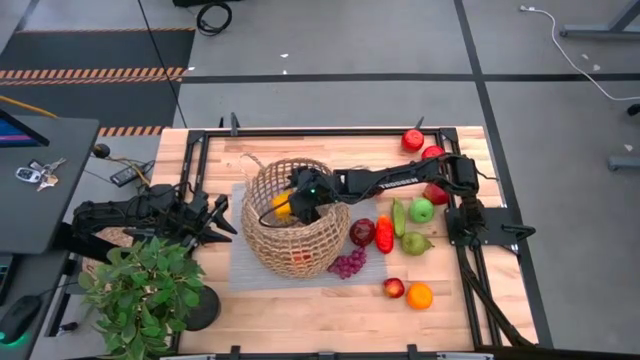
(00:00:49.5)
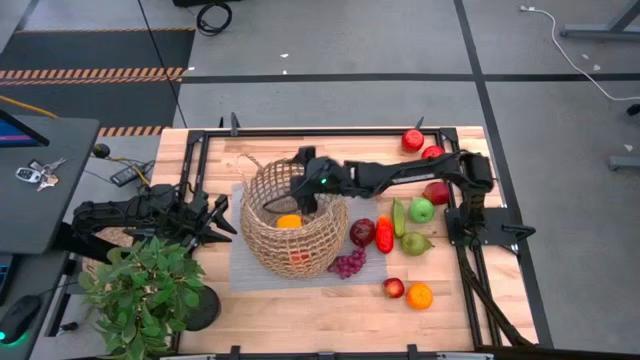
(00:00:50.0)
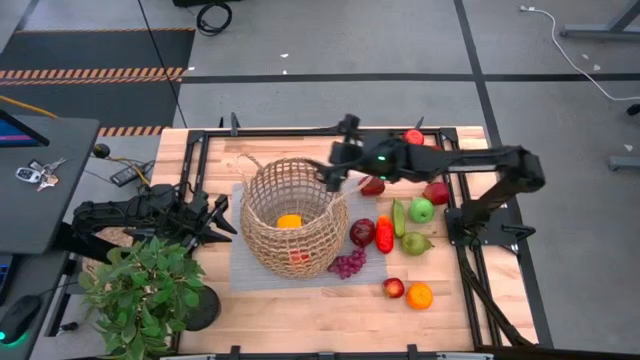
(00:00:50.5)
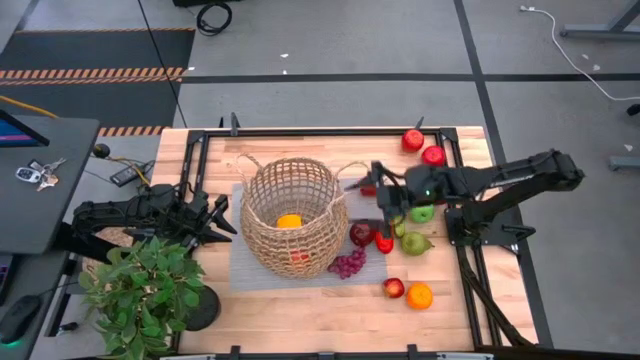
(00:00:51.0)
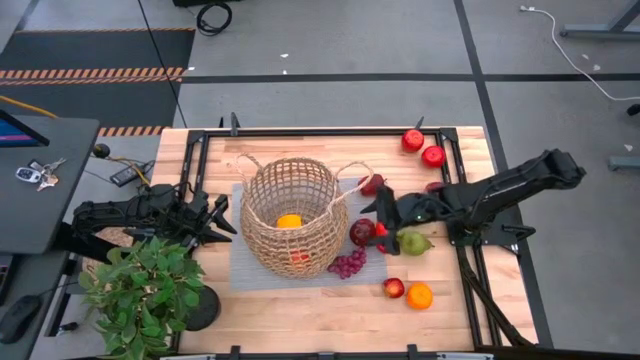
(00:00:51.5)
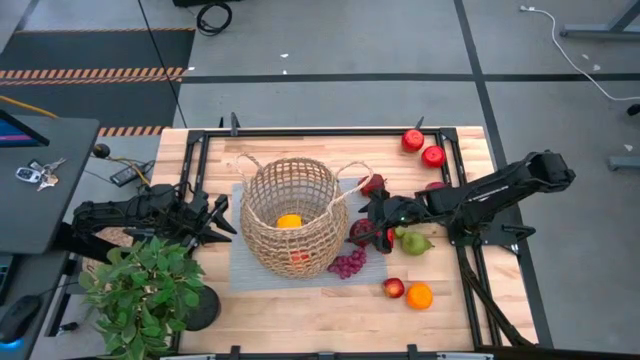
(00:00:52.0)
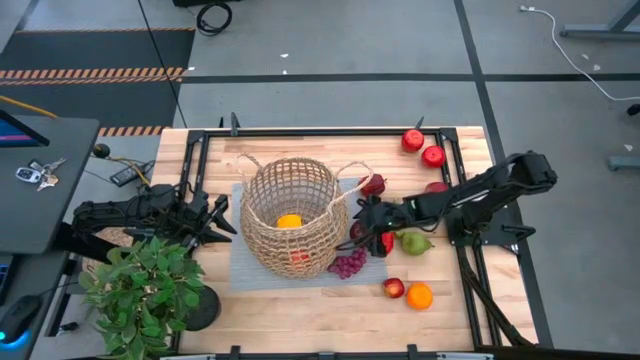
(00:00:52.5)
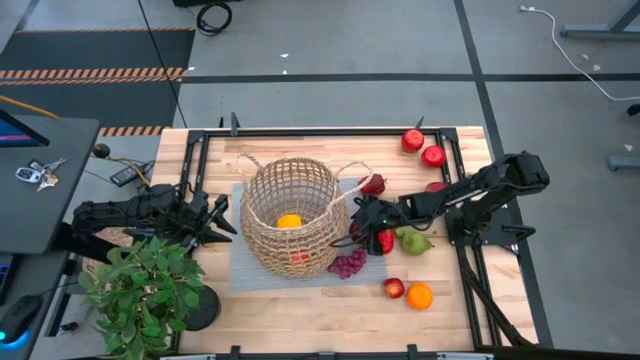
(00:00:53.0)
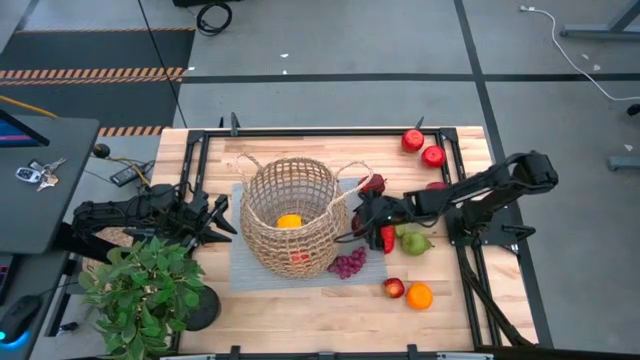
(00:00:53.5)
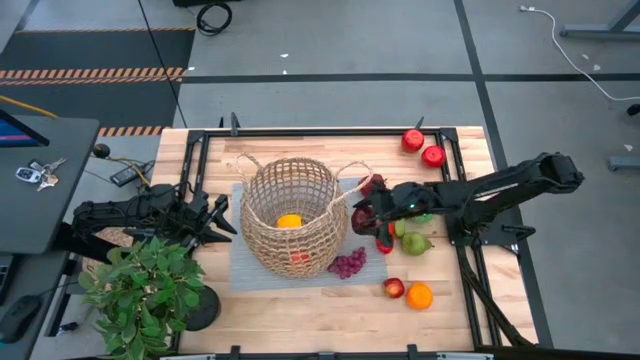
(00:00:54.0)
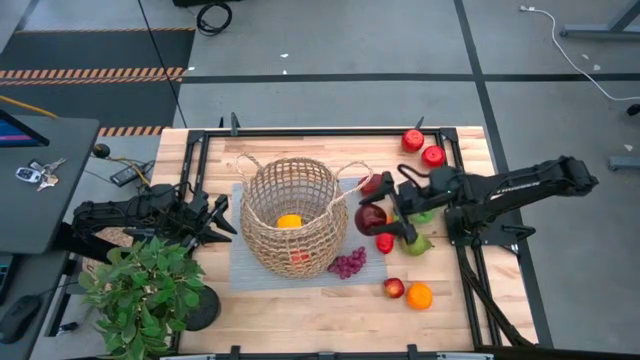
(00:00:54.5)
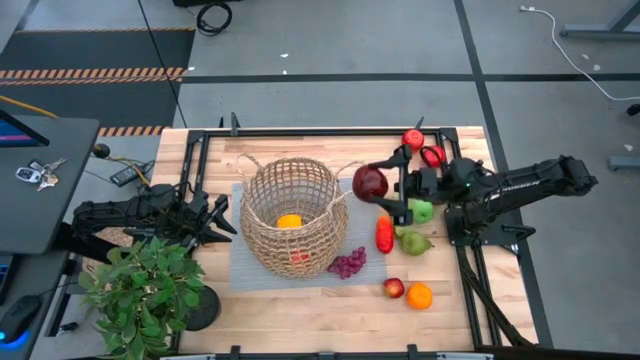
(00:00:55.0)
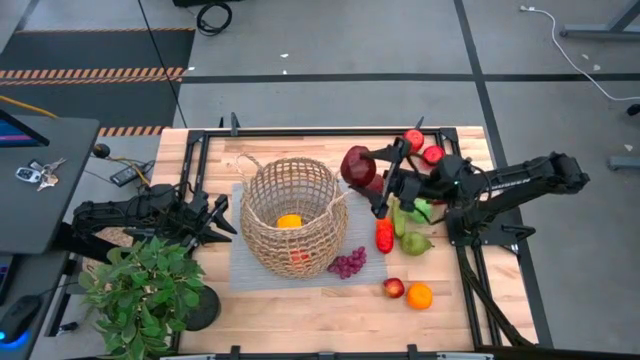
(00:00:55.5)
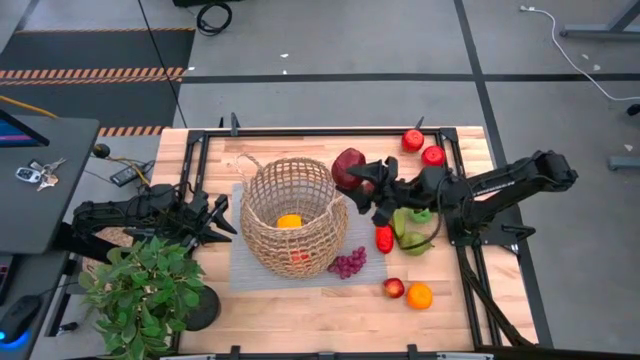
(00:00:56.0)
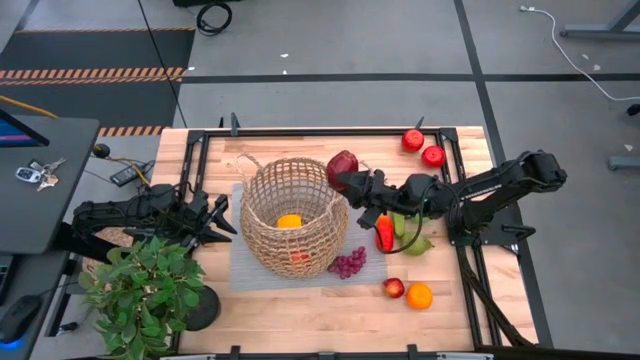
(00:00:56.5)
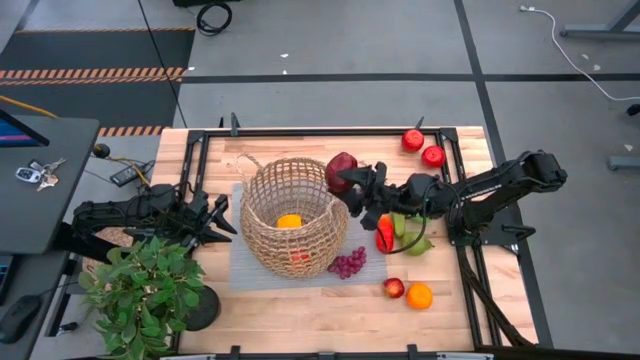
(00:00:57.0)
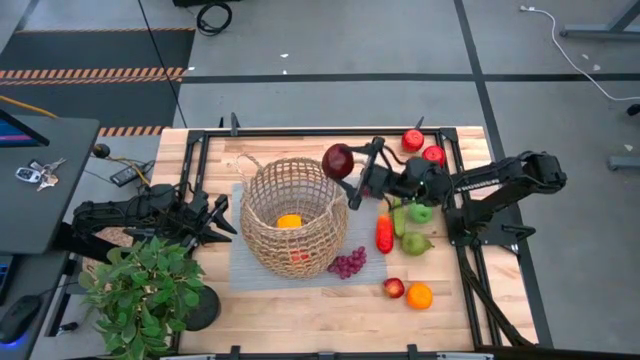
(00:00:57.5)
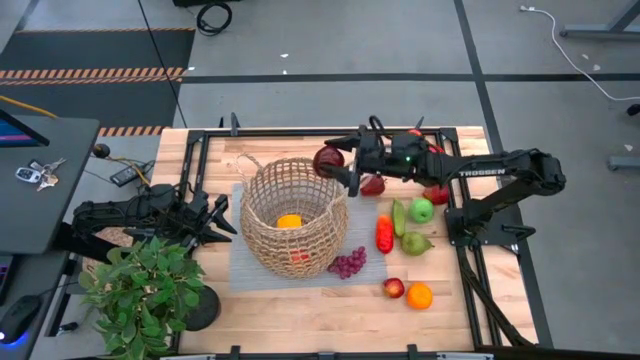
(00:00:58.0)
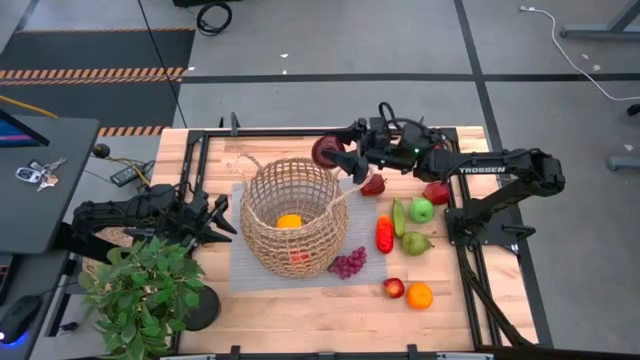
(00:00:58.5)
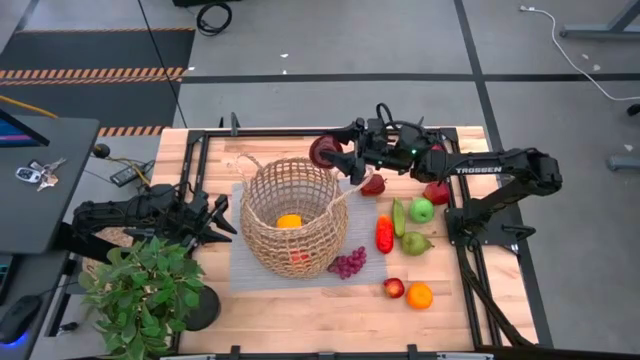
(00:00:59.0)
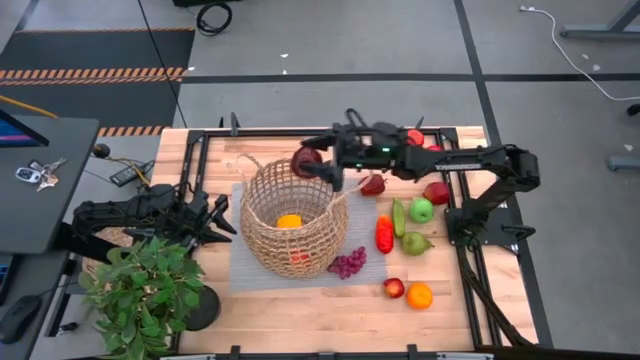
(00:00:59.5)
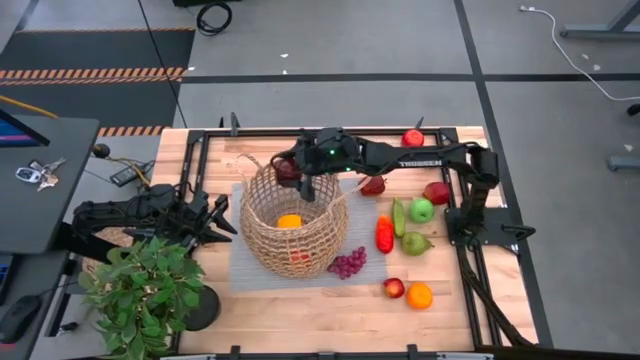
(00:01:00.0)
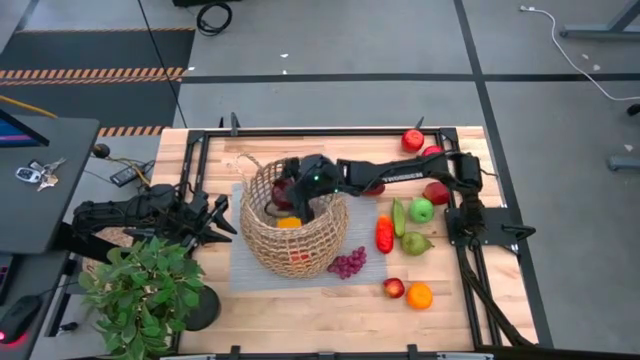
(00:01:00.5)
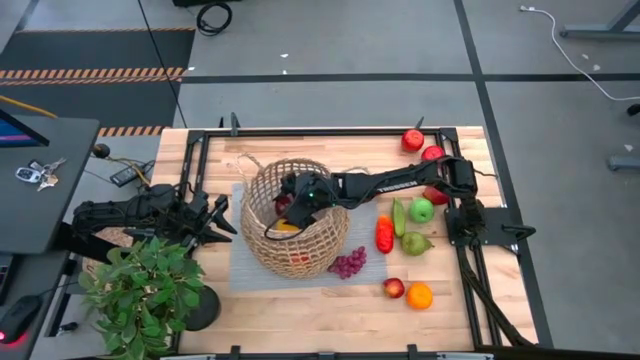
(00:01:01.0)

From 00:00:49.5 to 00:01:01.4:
Task: Build produce basket
Put the red apple into the brown basket

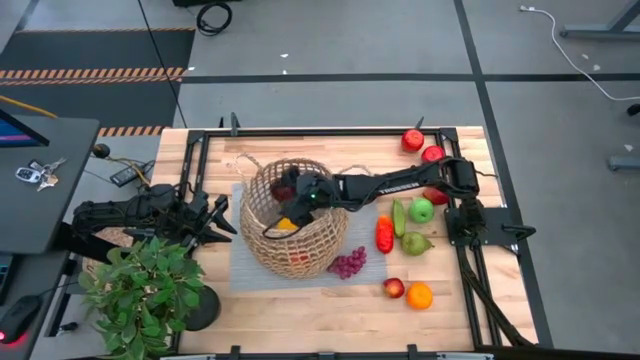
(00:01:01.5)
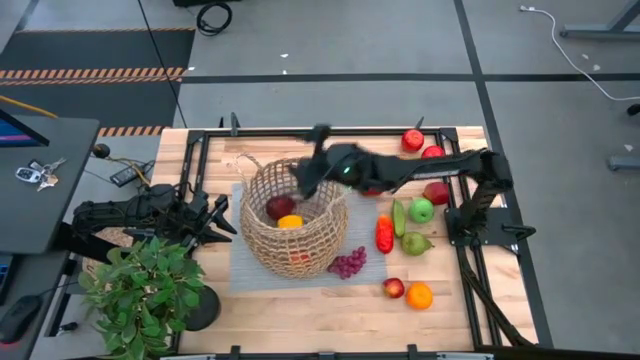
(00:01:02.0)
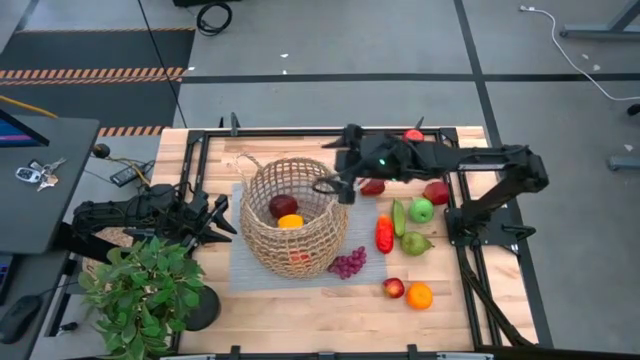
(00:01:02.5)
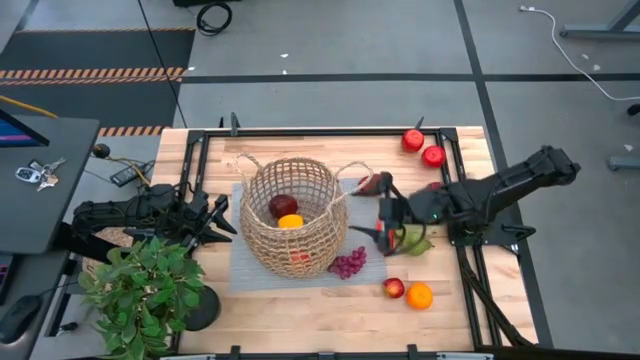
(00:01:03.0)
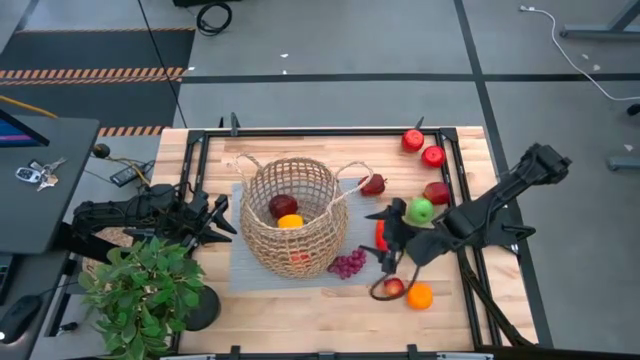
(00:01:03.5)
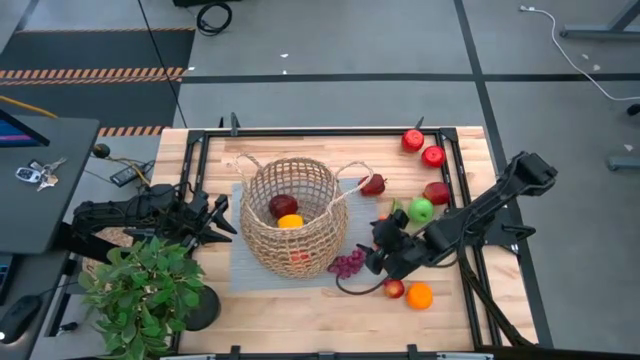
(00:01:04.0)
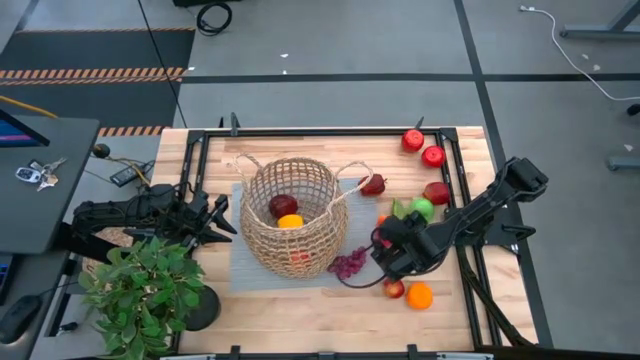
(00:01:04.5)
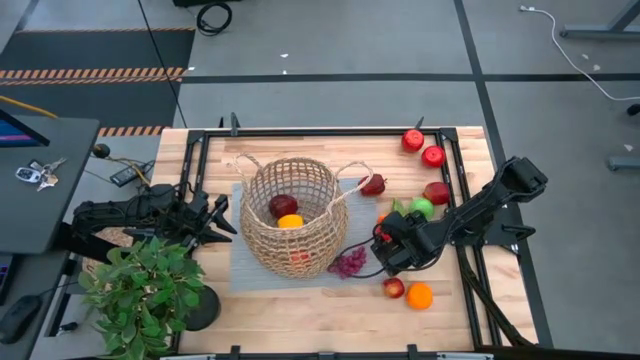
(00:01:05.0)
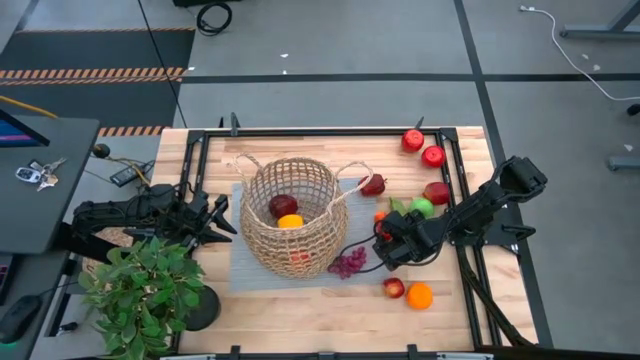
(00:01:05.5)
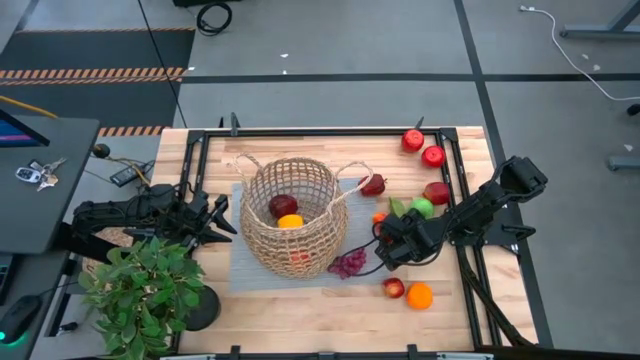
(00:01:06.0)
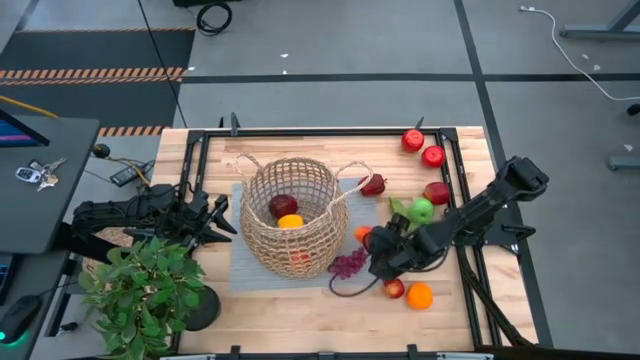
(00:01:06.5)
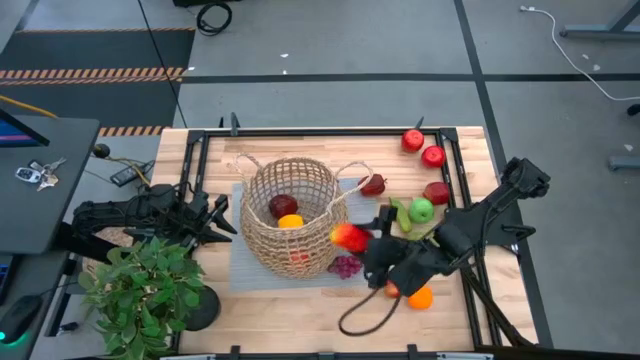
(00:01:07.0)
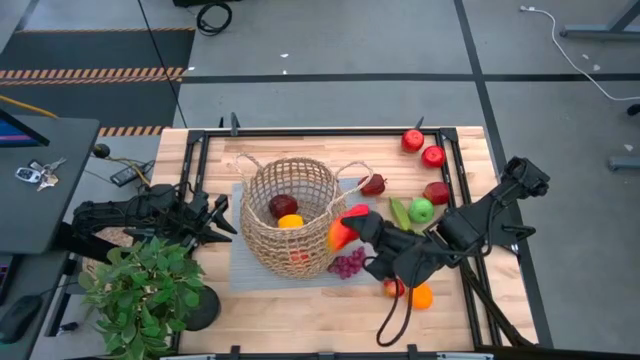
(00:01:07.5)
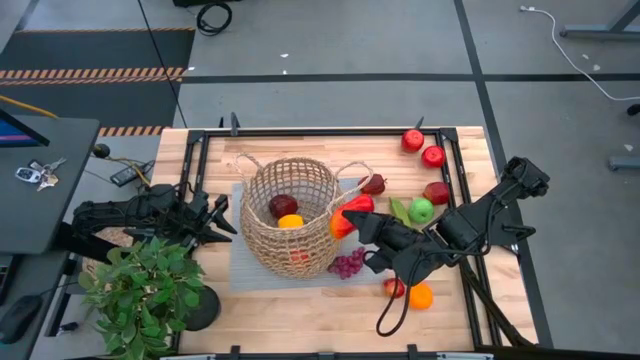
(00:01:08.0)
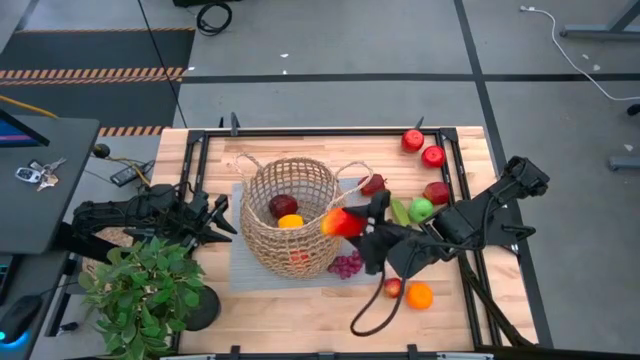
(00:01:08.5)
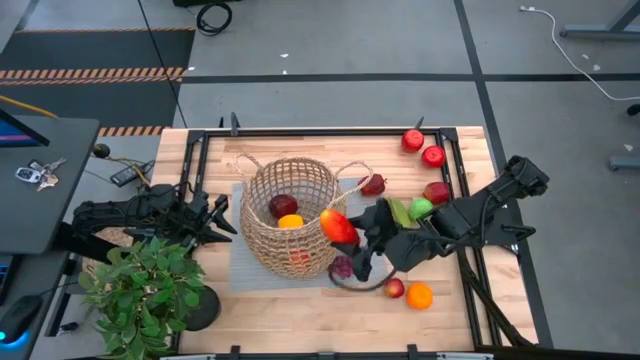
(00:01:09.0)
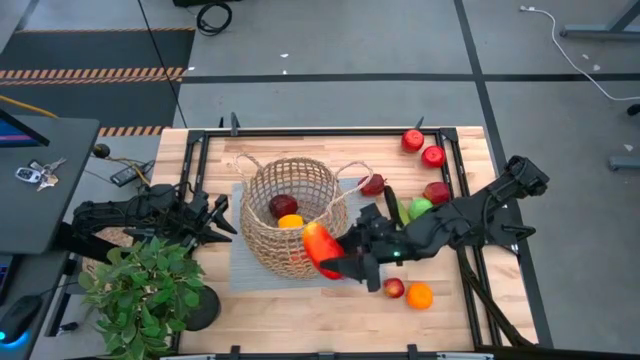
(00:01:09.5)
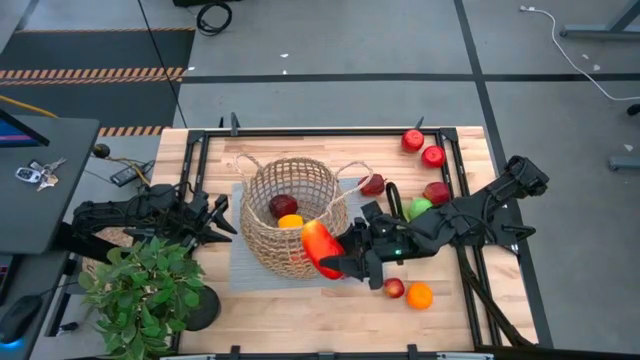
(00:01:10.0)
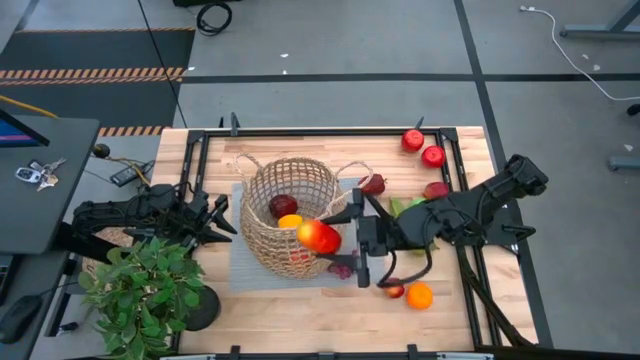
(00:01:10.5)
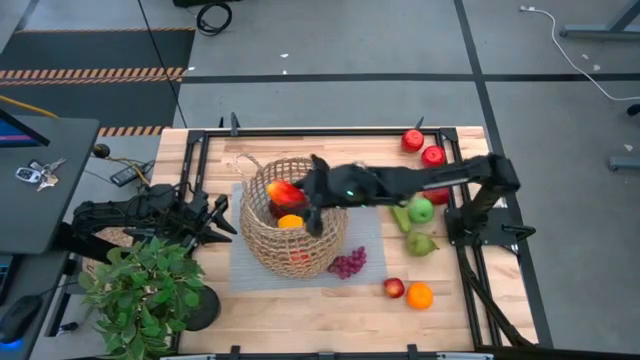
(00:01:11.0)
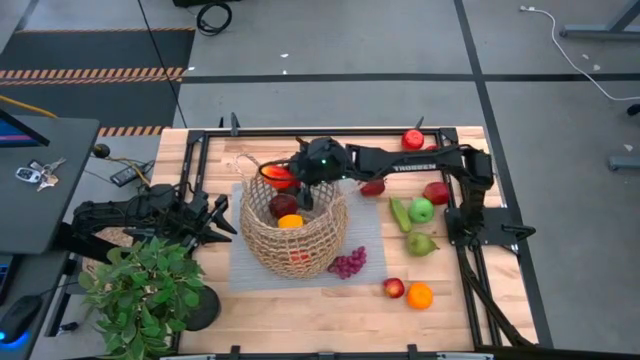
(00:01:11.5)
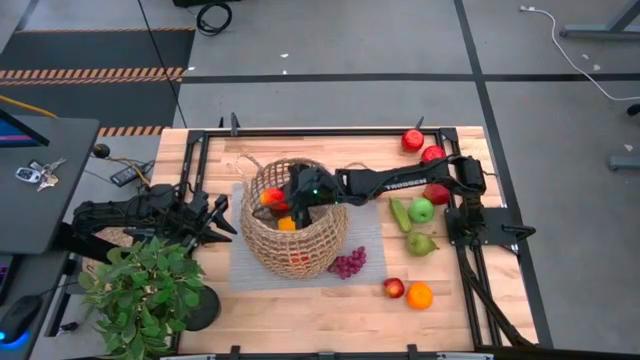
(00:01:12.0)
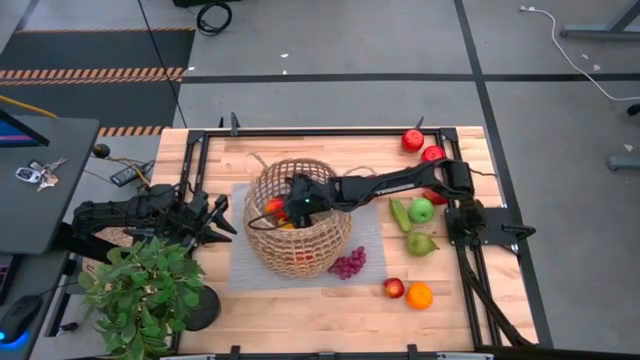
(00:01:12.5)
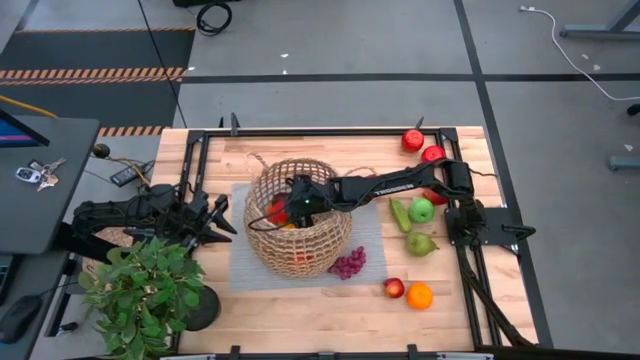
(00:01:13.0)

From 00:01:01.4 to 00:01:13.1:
Put the red mango into the brown basket
